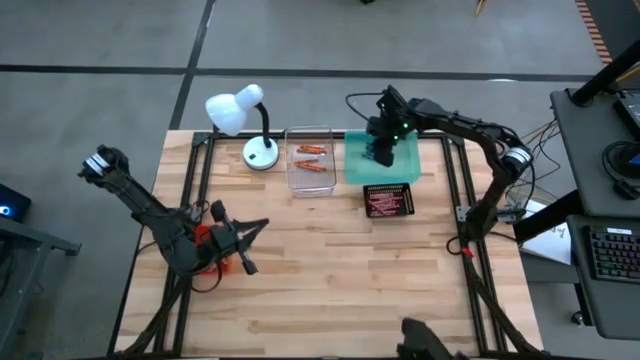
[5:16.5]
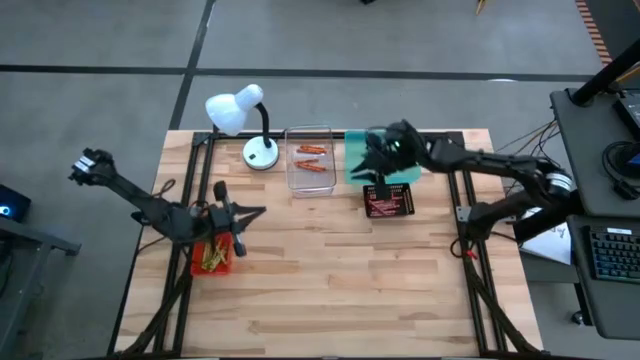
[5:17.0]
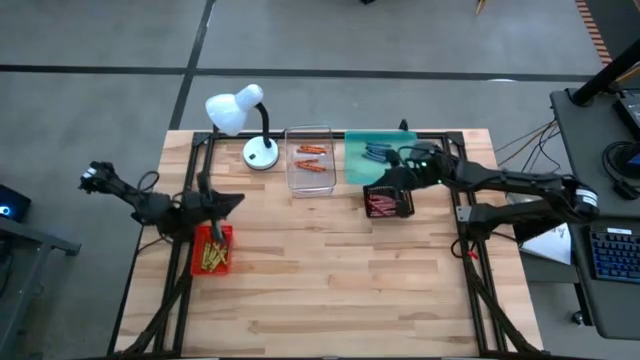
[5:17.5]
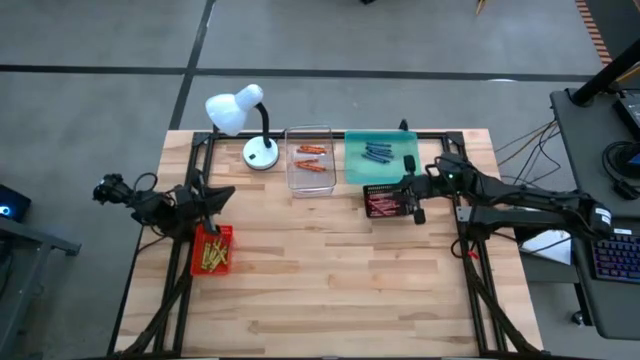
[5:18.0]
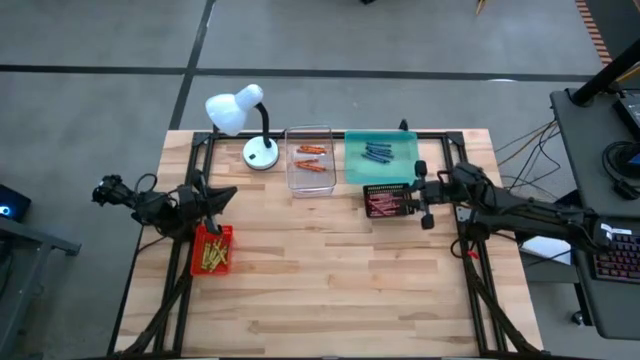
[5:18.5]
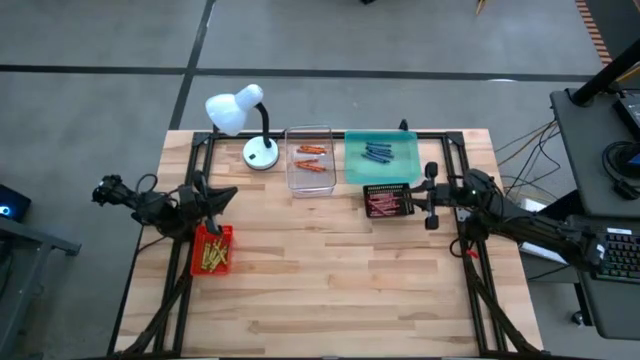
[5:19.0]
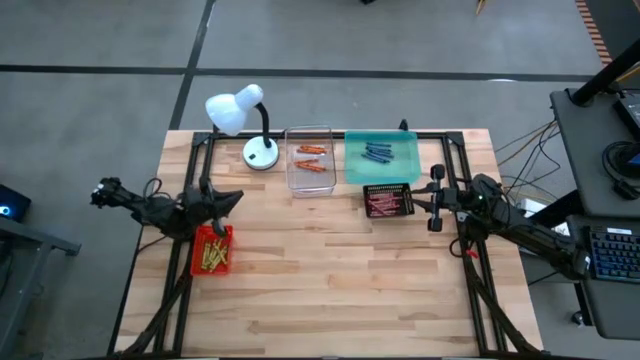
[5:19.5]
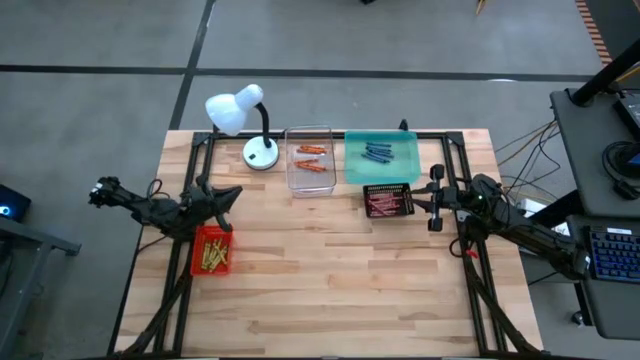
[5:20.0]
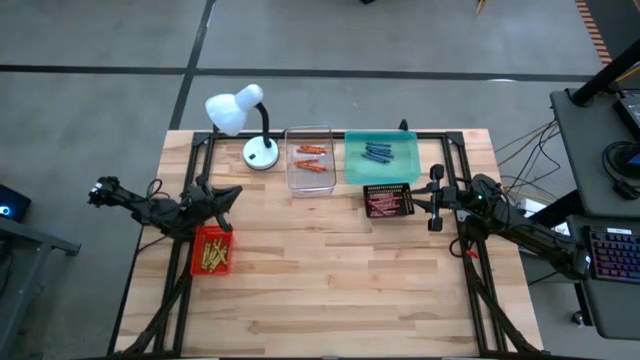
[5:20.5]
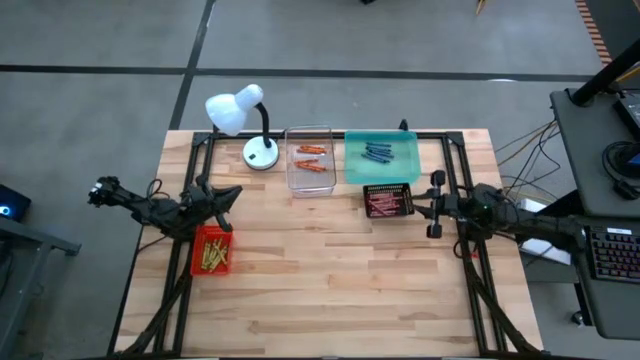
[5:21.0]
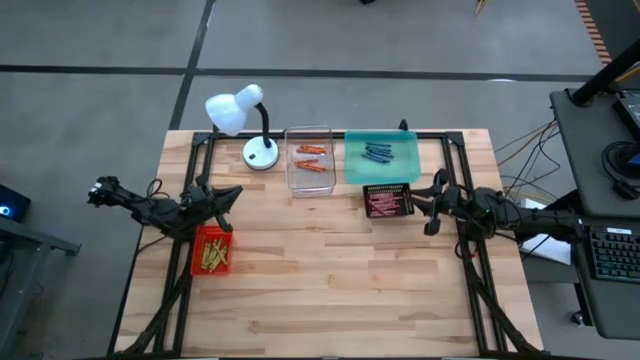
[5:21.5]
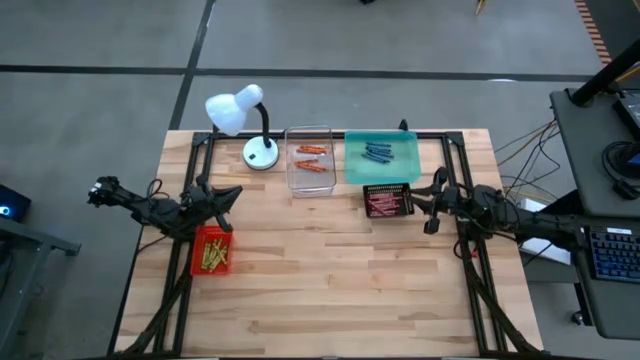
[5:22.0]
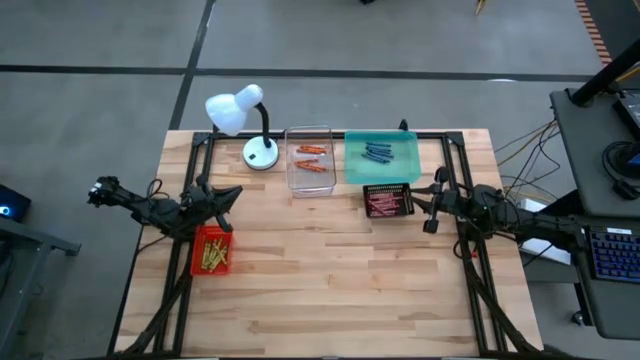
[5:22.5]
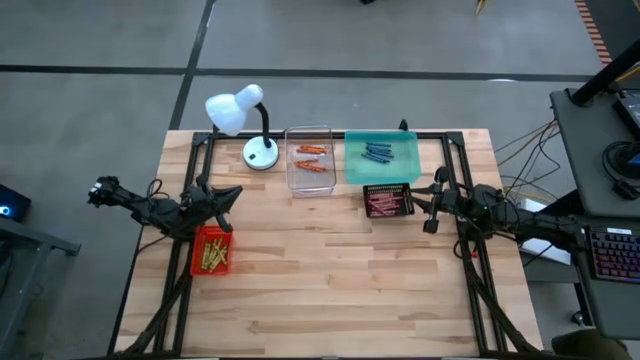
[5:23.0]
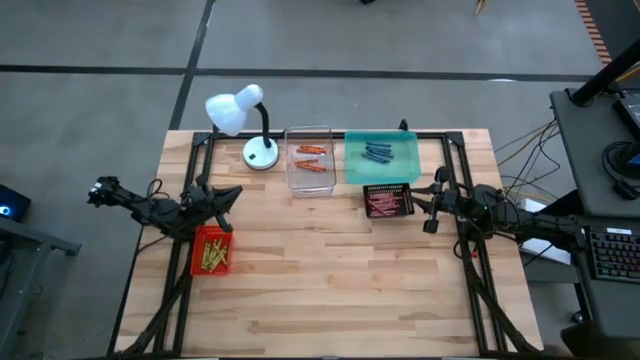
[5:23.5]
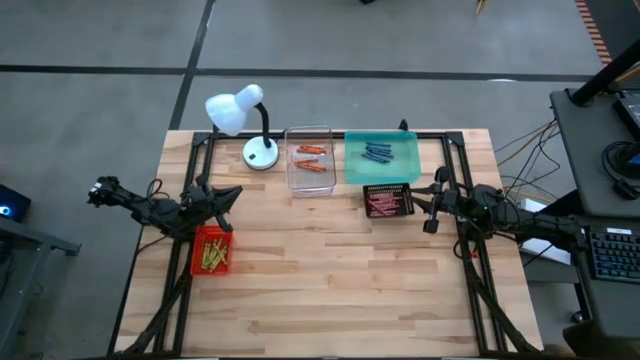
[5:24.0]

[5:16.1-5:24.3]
Task: Sort crayons
Return to Home Position

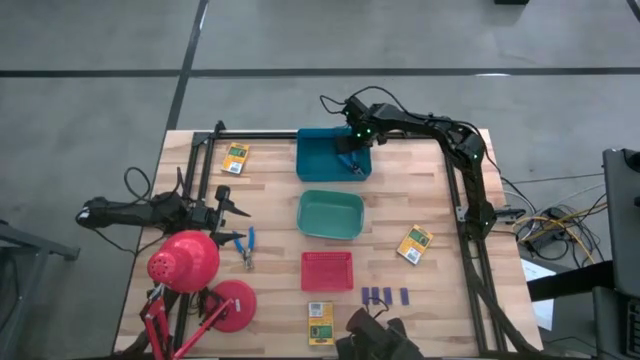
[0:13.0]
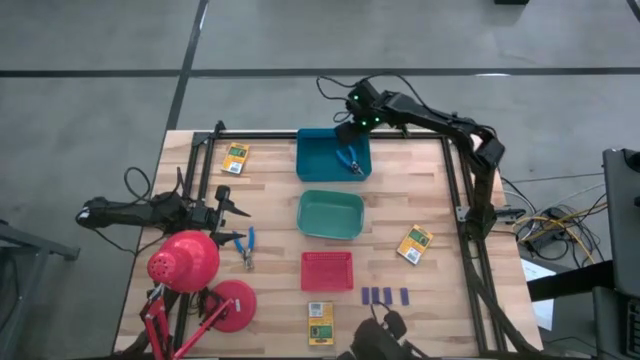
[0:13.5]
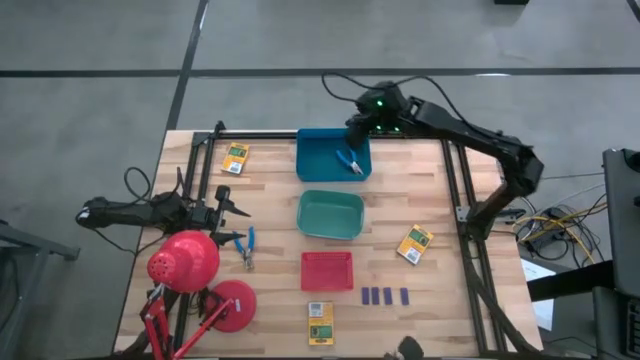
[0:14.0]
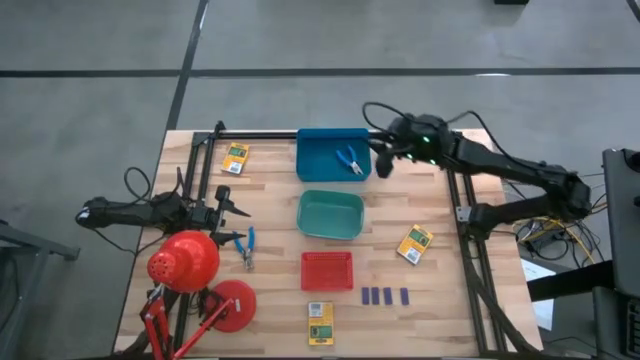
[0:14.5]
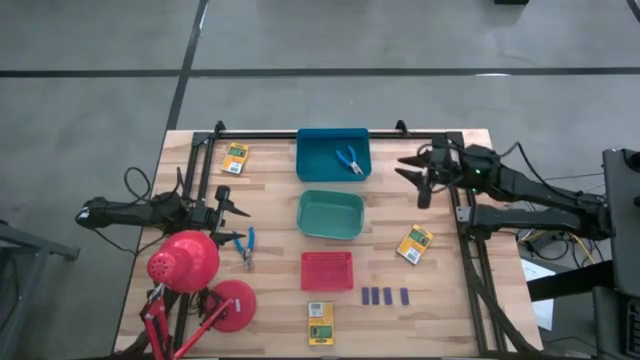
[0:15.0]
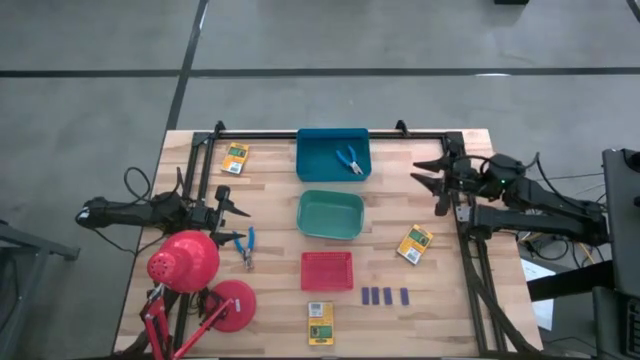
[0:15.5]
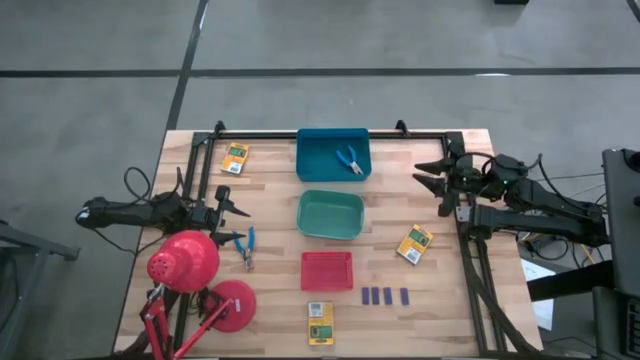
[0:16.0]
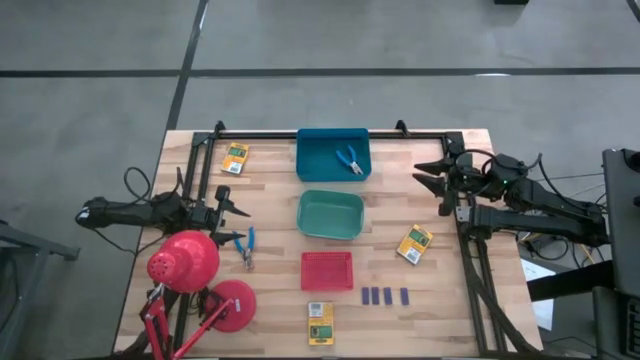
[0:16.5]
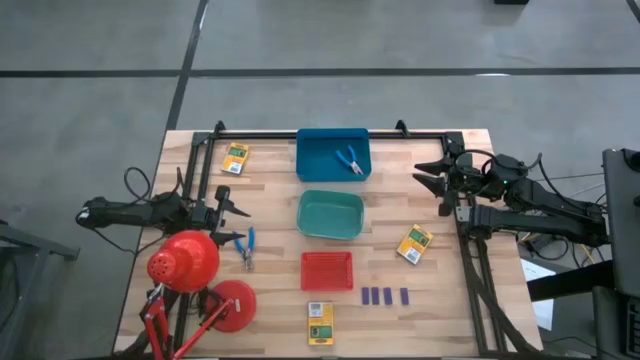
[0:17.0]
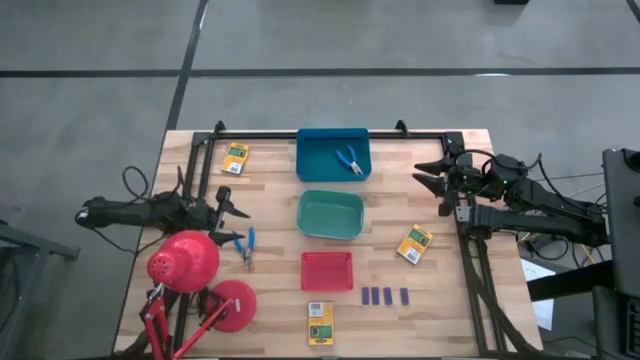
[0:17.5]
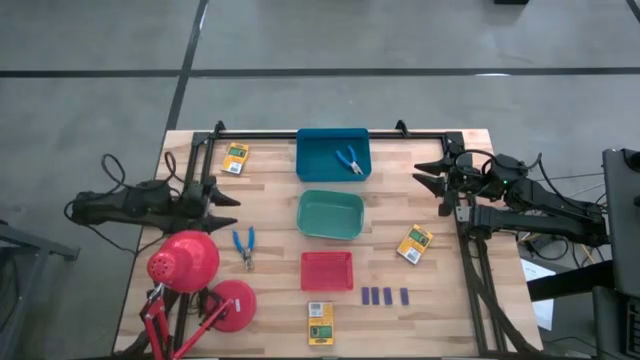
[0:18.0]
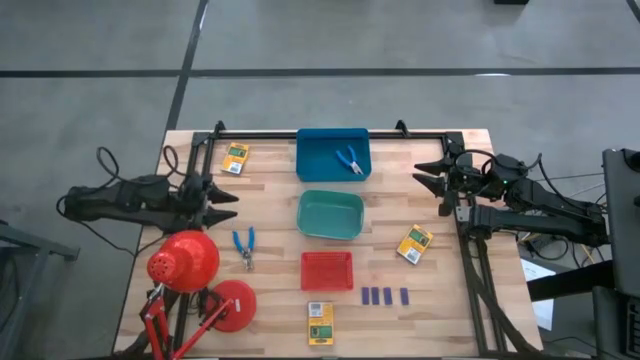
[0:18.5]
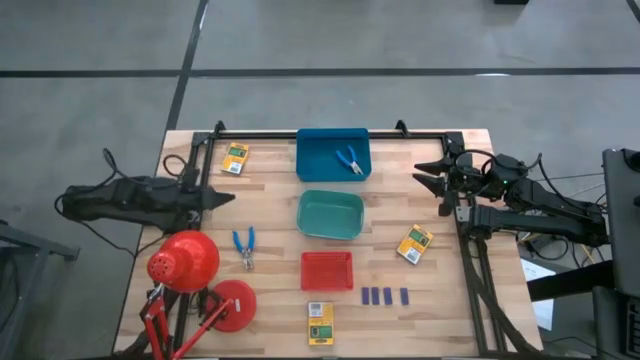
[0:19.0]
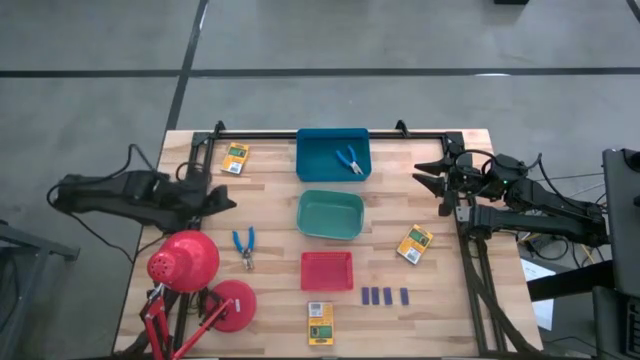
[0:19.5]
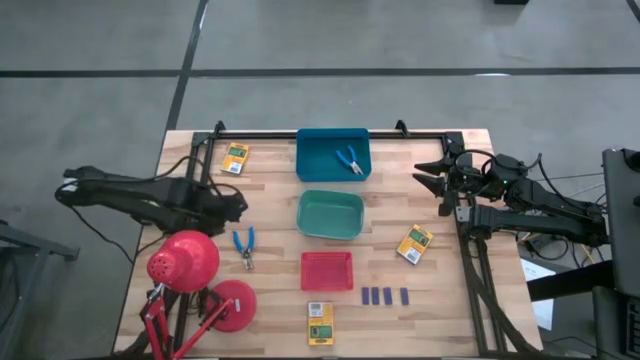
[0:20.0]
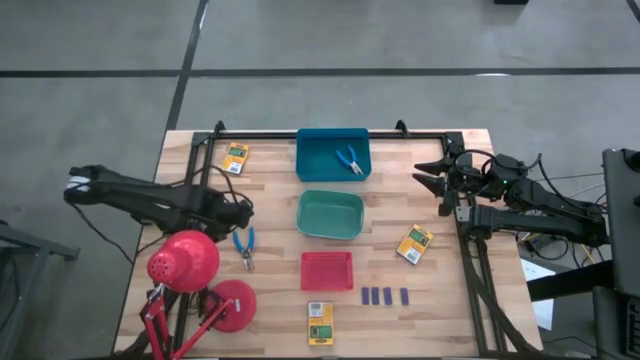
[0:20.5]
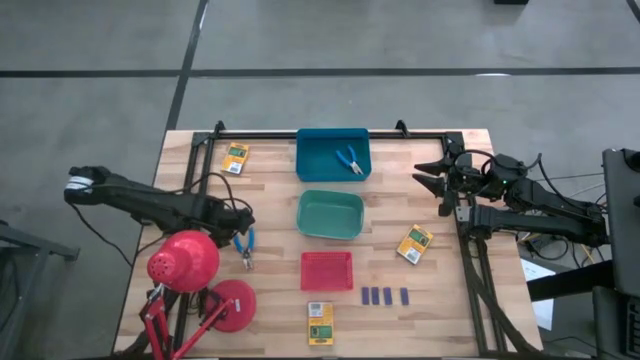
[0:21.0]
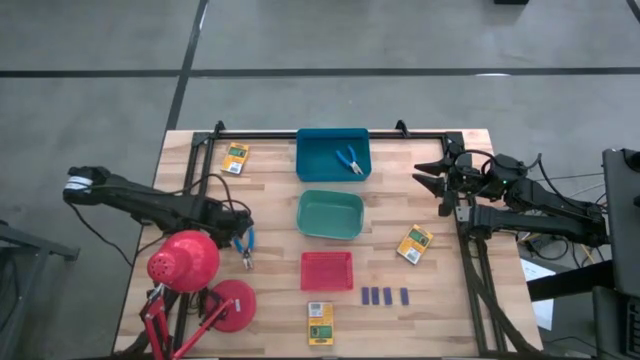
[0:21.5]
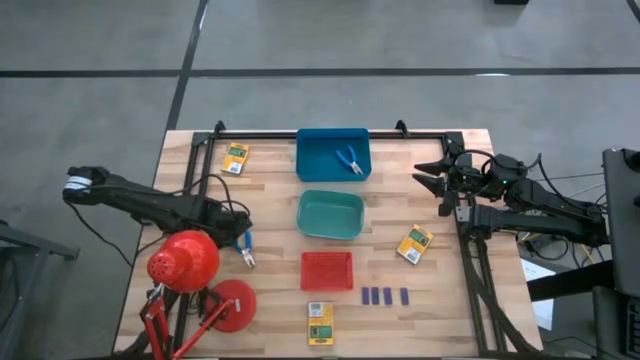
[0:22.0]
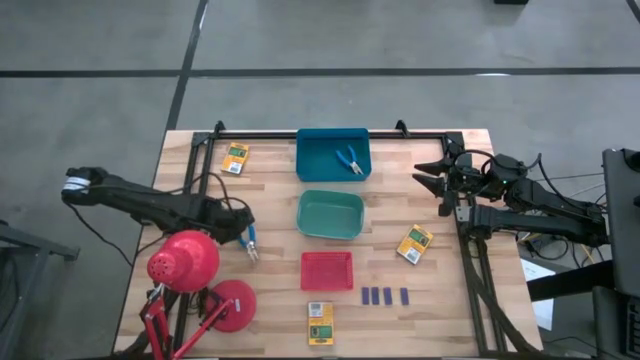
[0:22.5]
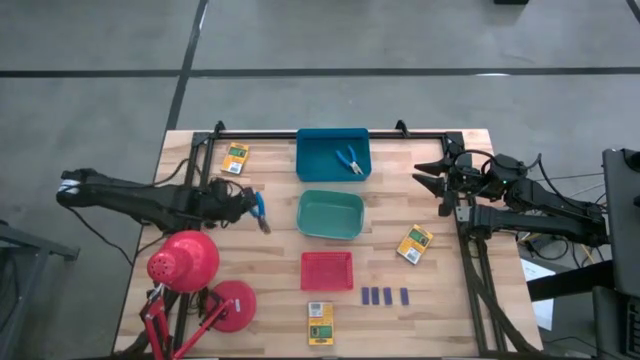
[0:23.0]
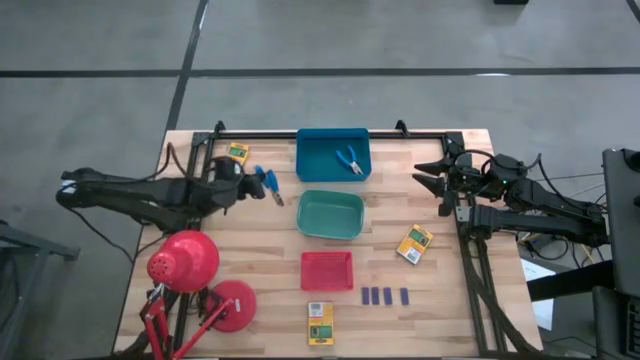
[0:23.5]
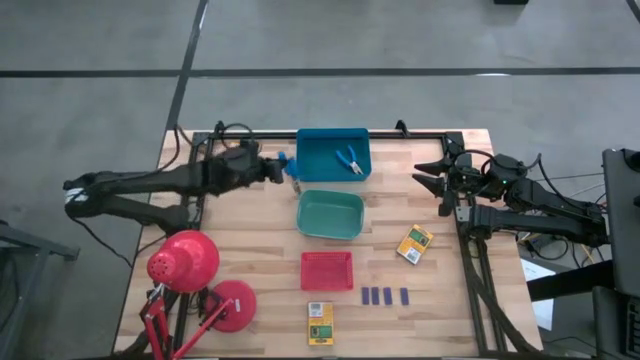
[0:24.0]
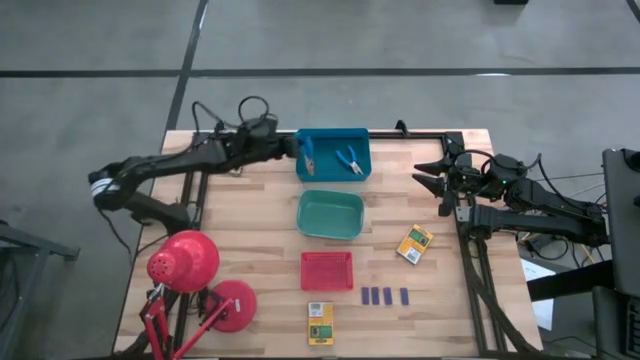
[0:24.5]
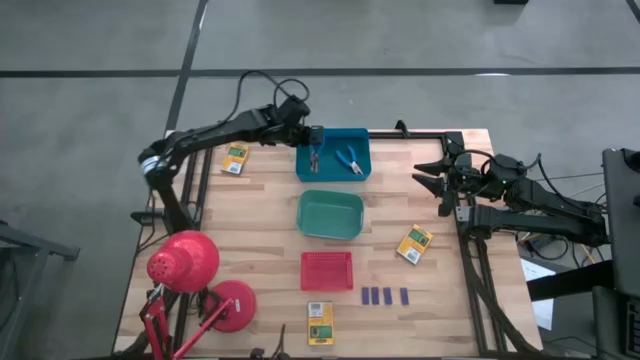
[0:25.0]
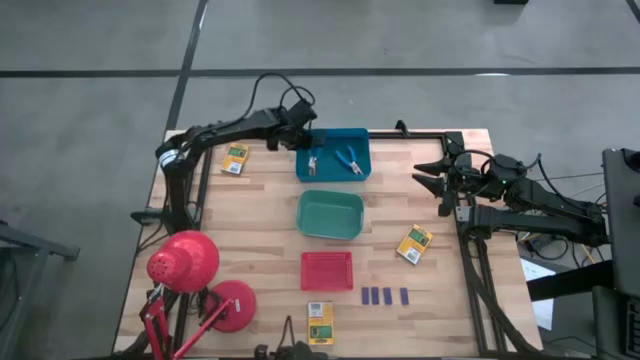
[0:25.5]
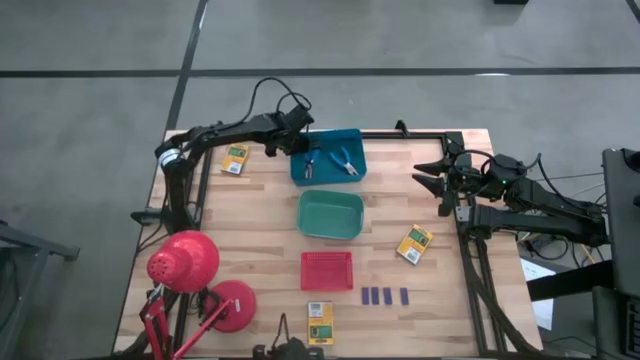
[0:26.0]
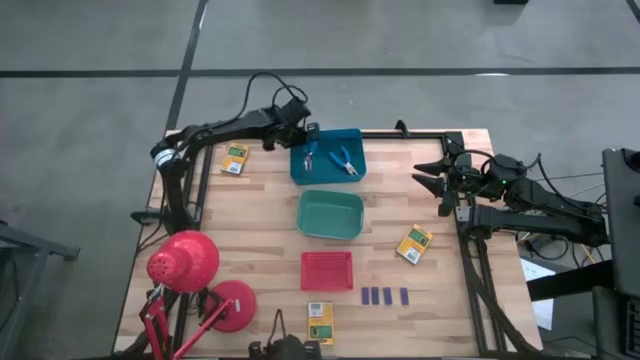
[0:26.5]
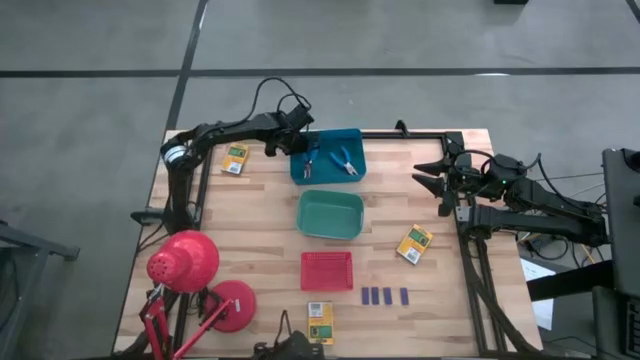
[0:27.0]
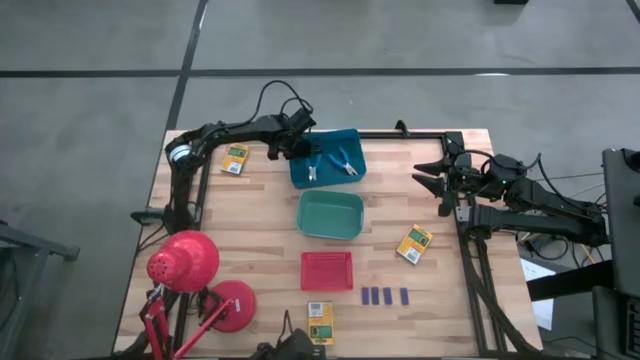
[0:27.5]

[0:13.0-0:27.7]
Task: Pick & Place School Supplies
Put the blue hole puncher into the blue bin
